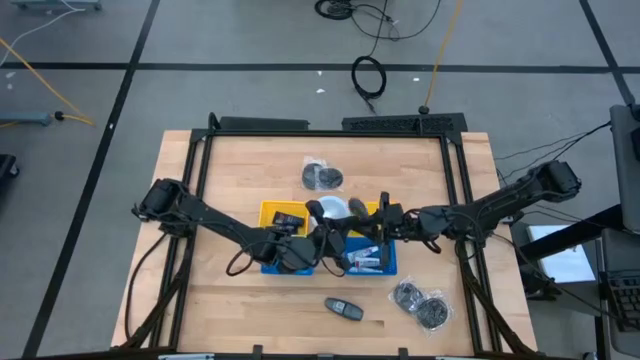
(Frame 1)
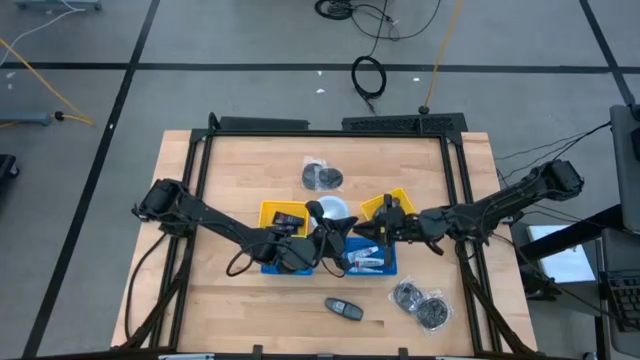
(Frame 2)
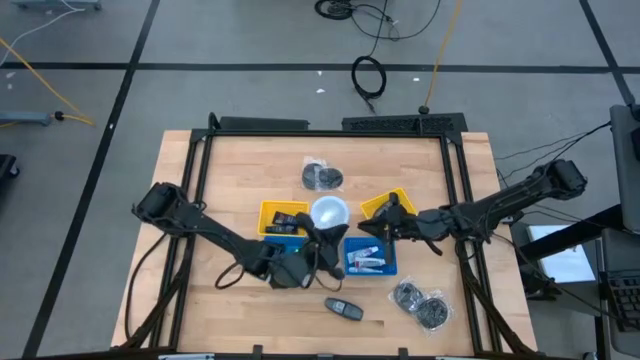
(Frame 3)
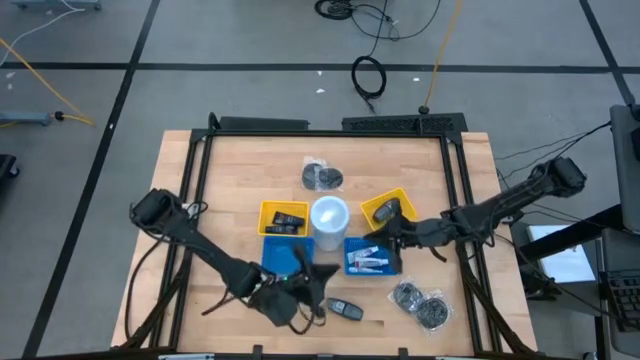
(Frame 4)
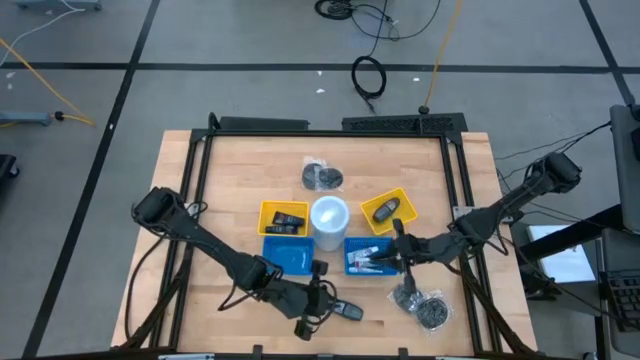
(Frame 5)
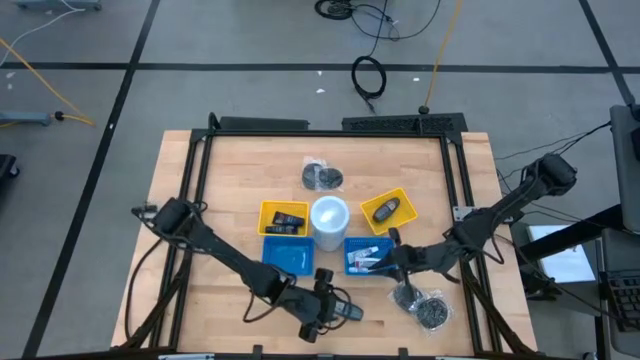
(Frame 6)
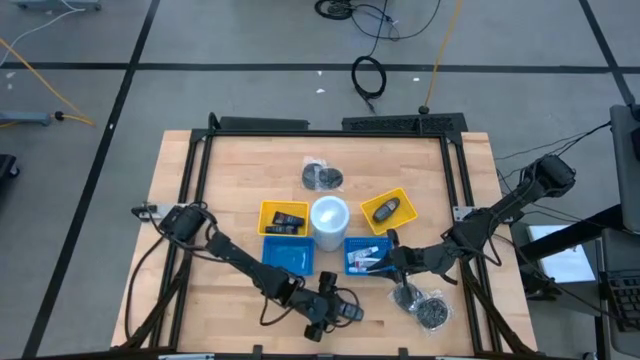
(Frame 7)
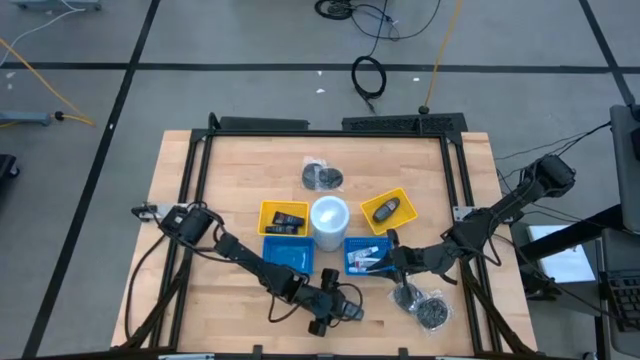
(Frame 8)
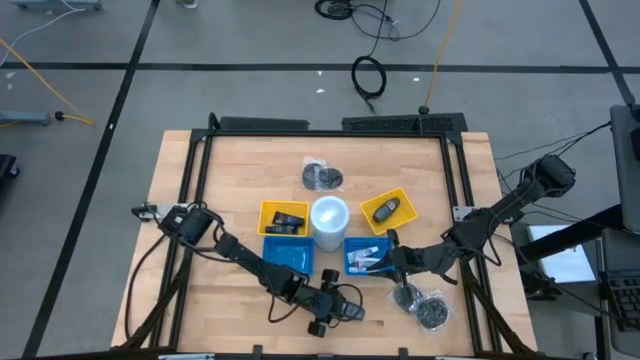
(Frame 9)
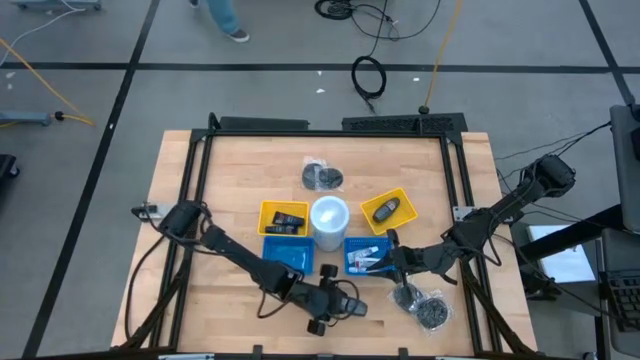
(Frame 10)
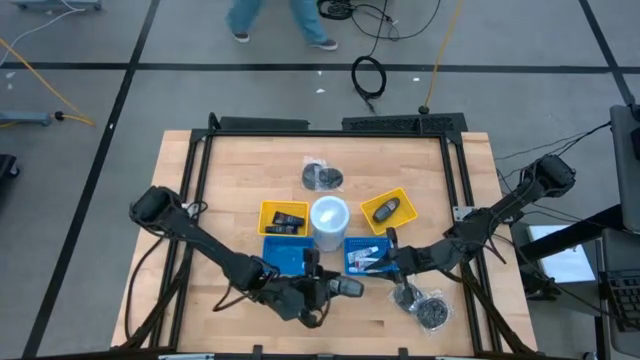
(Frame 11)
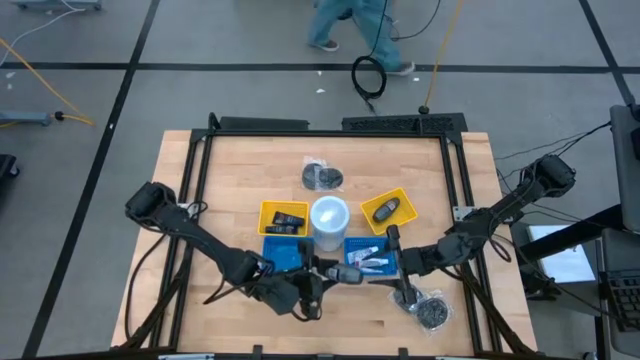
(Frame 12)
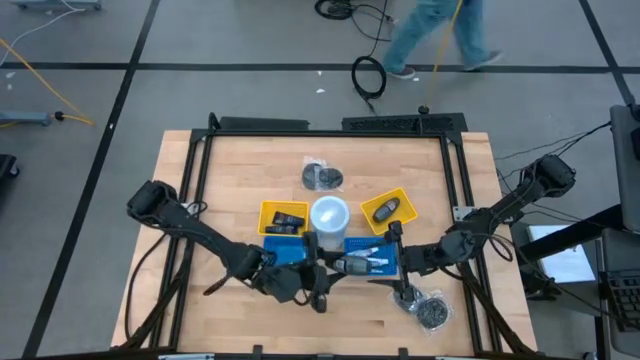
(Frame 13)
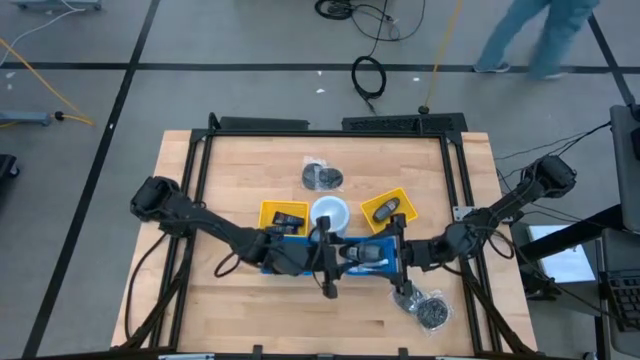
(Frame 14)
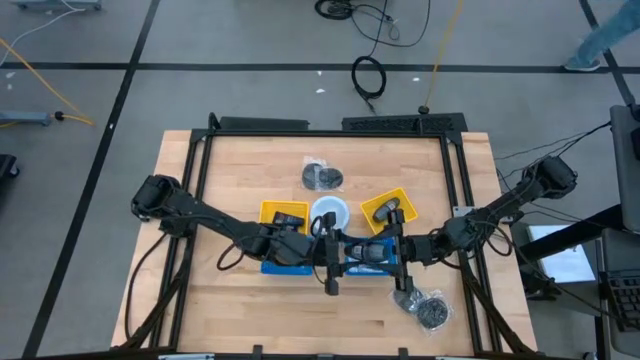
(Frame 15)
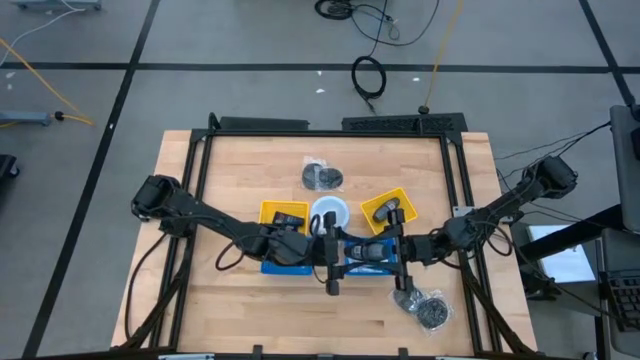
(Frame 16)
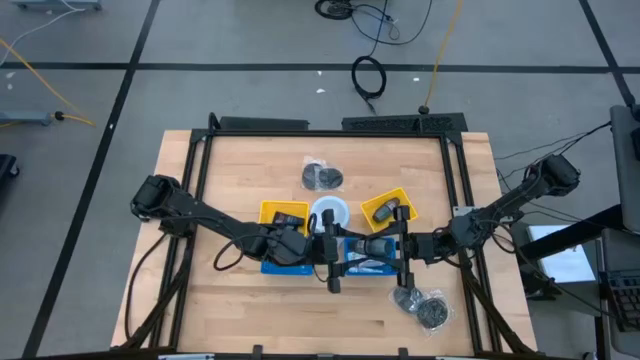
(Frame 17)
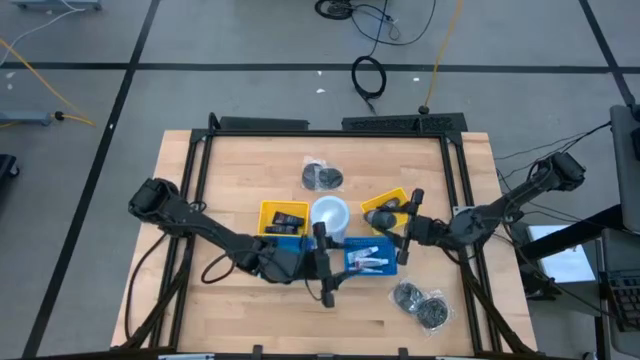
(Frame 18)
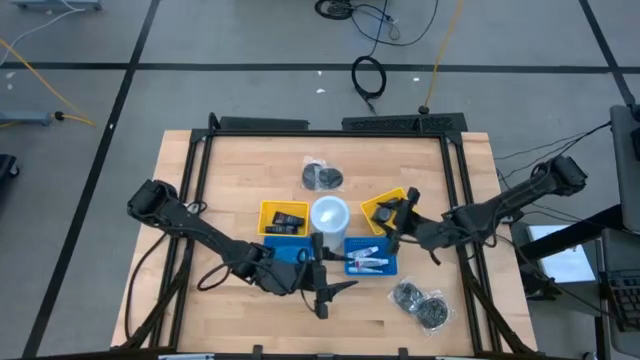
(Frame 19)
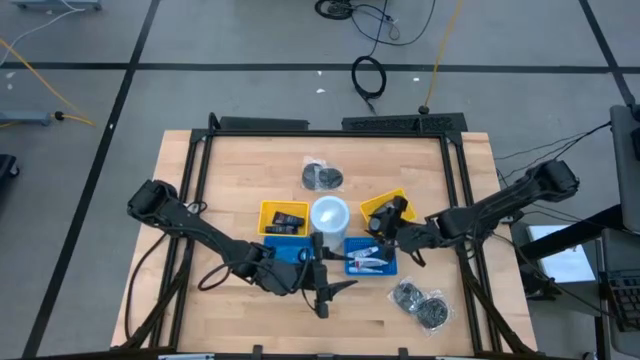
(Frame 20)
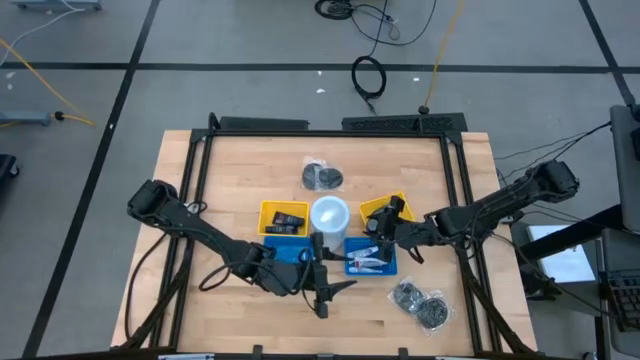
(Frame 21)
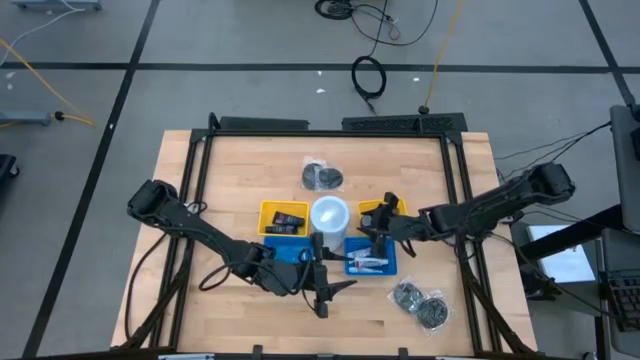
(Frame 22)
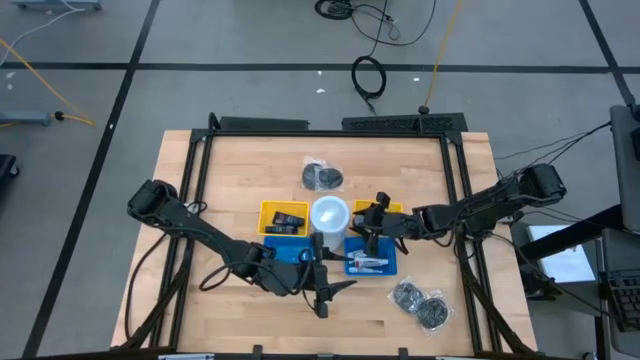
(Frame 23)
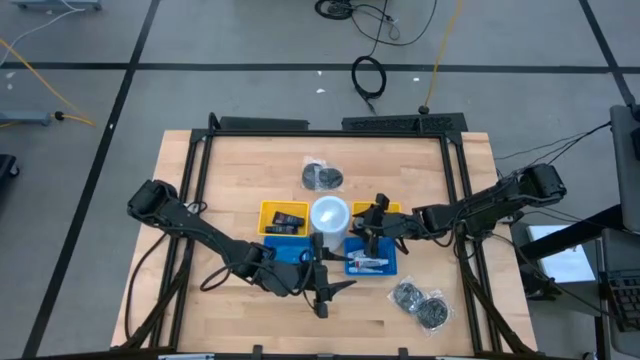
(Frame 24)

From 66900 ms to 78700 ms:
Task: Pick & Place Travel size toiletries
Put the deodorant into the right yellow bin

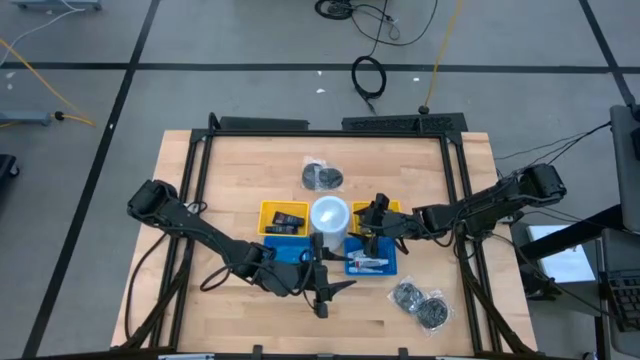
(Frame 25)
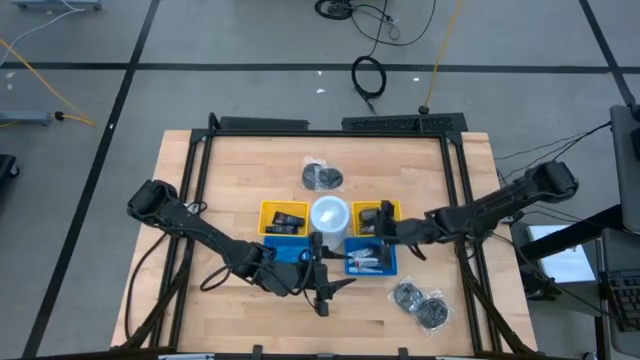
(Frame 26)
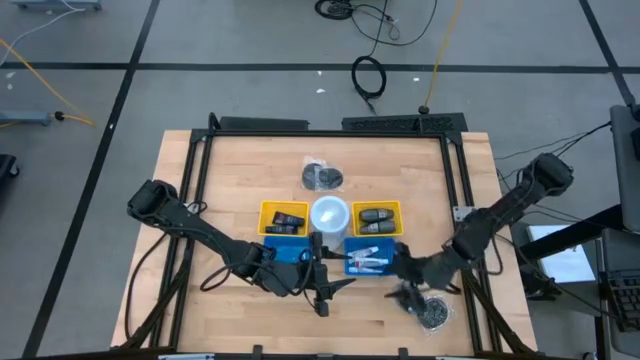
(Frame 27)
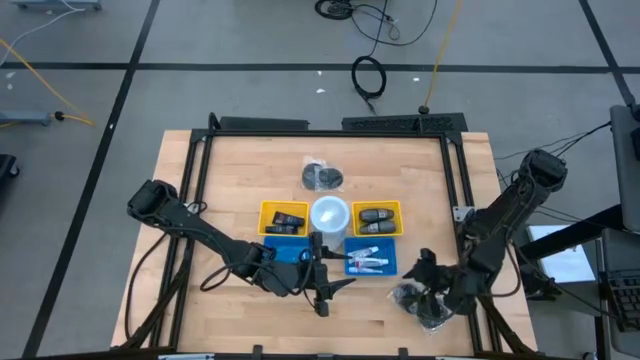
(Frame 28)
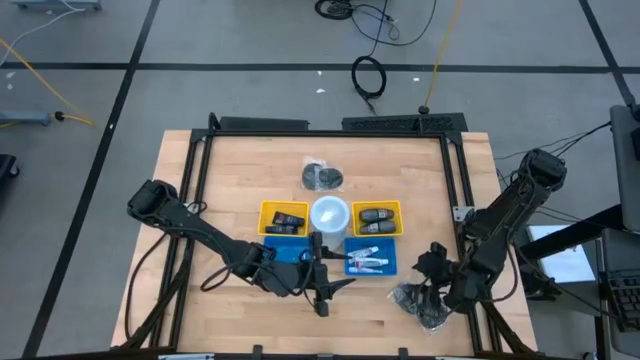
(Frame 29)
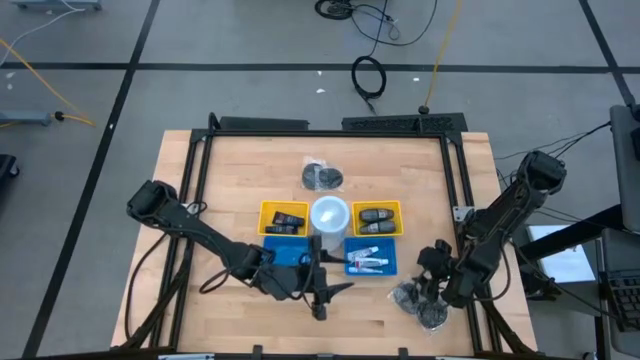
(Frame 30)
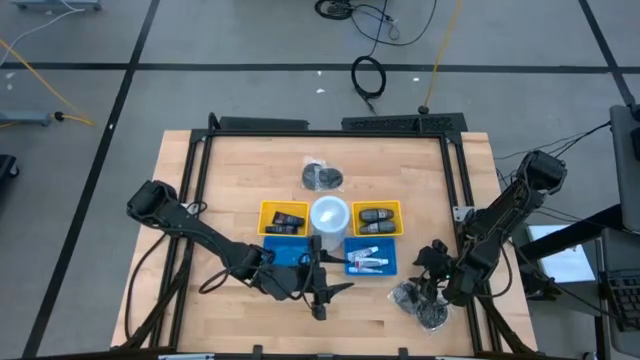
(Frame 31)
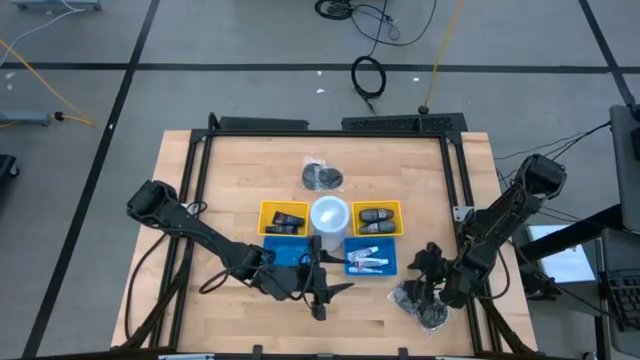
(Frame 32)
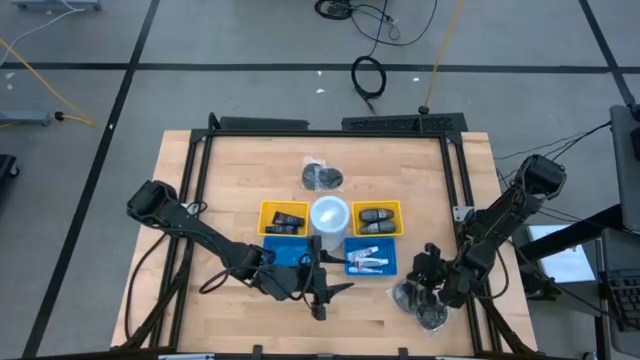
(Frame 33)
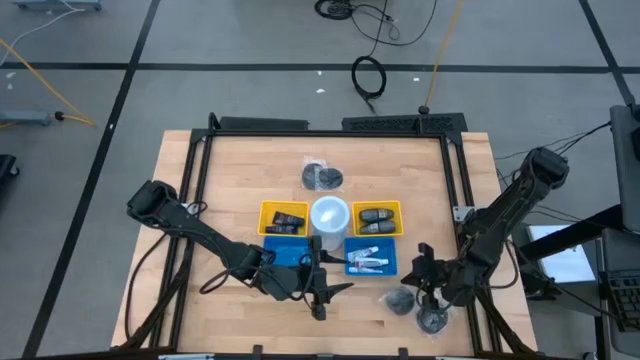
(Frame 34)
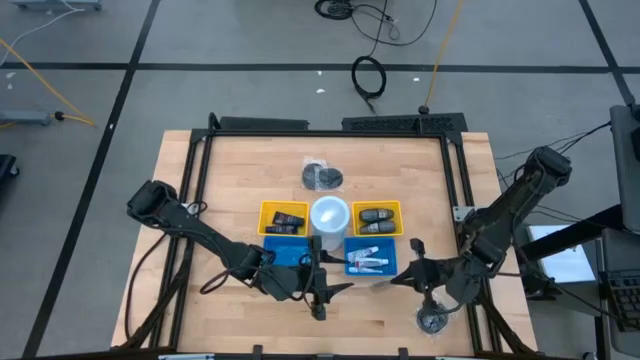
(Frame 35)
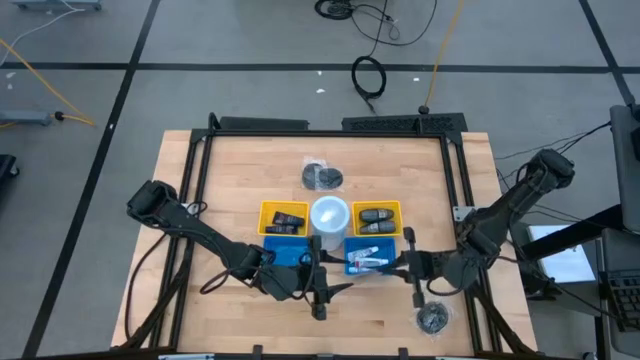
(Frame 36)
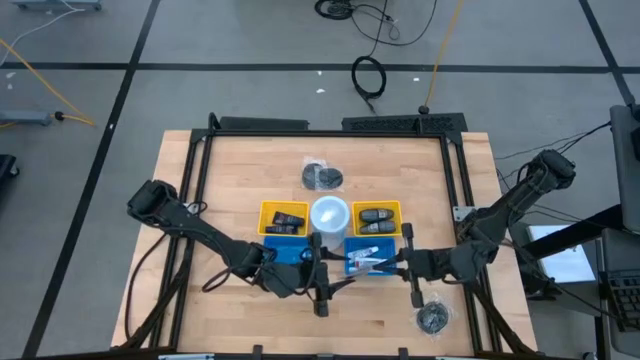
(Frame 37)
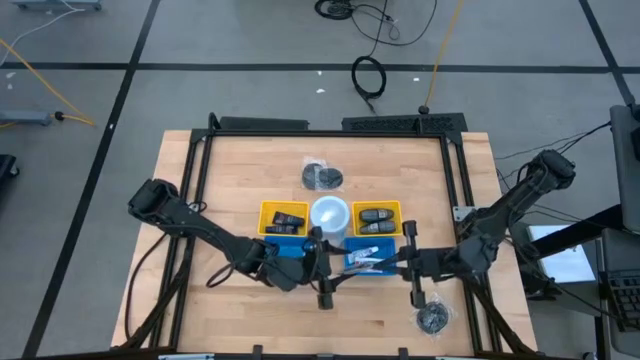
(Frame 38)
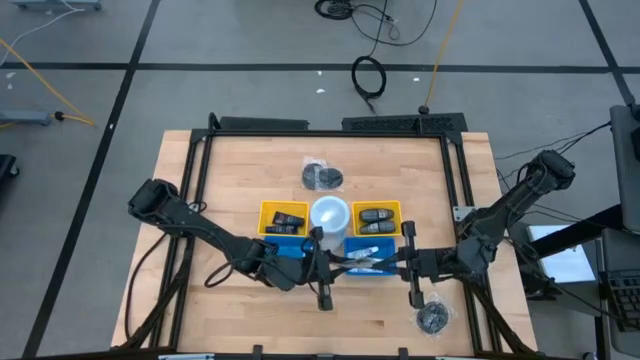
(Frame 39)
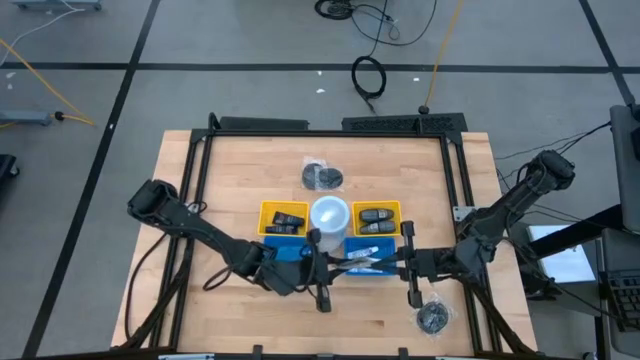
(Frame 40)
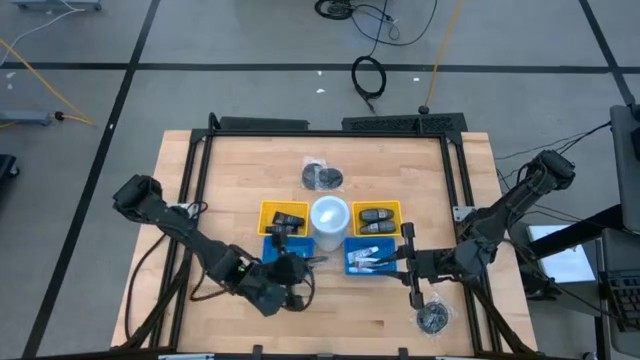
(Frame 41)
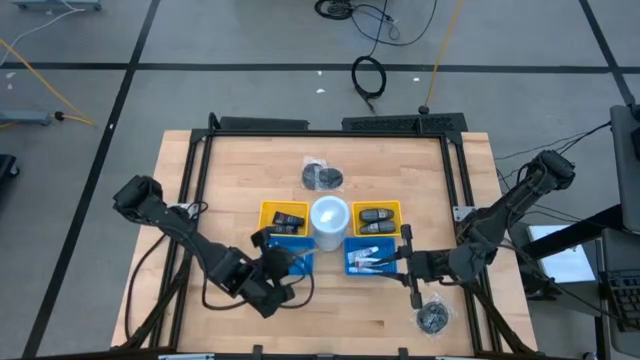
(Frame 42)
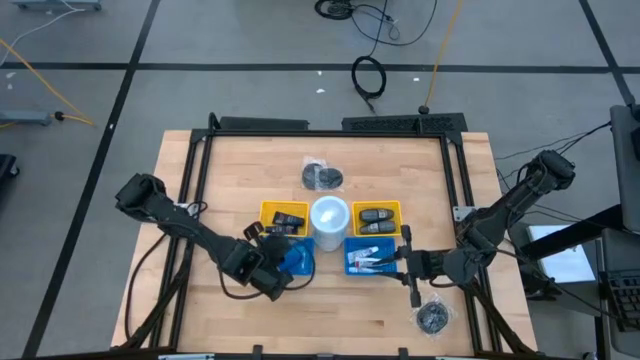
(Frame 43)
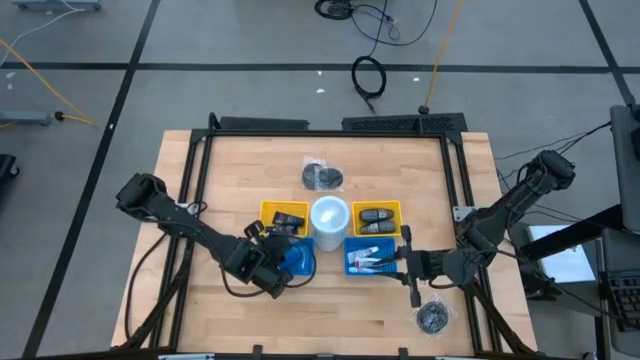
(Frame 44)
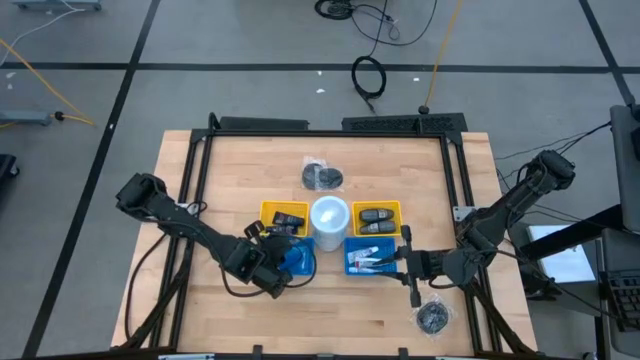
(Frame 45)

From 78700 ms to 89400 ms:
Put the hairbrush into the left blue bin
